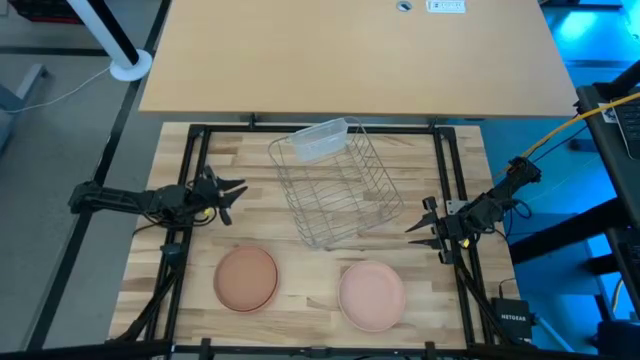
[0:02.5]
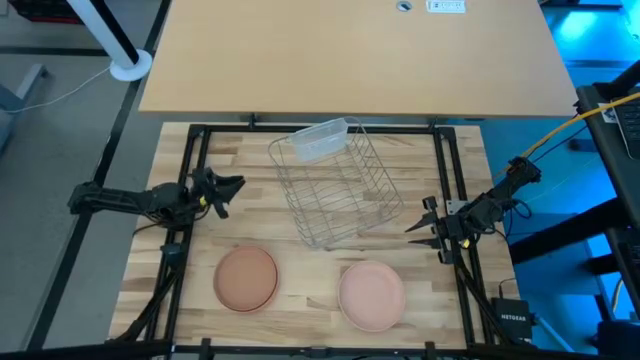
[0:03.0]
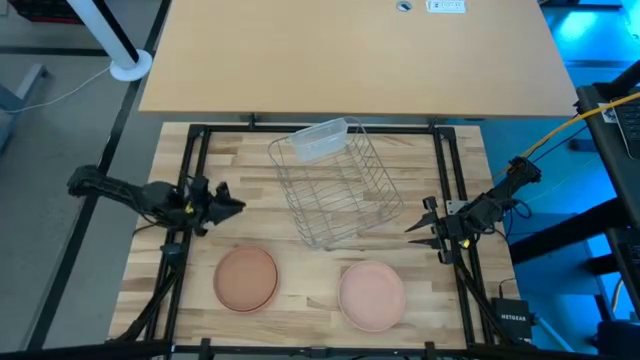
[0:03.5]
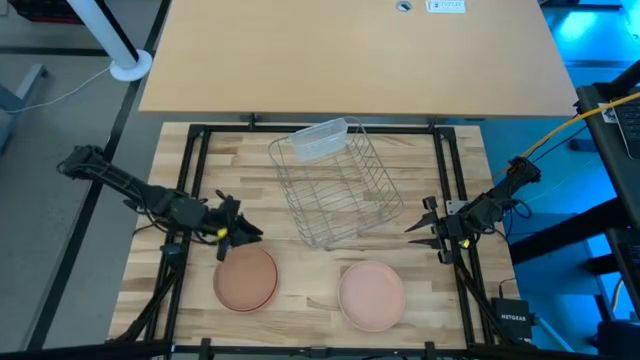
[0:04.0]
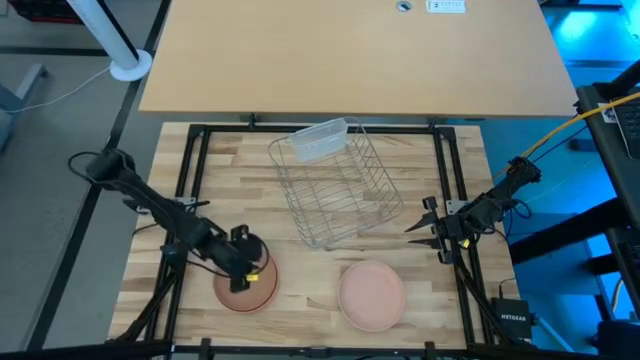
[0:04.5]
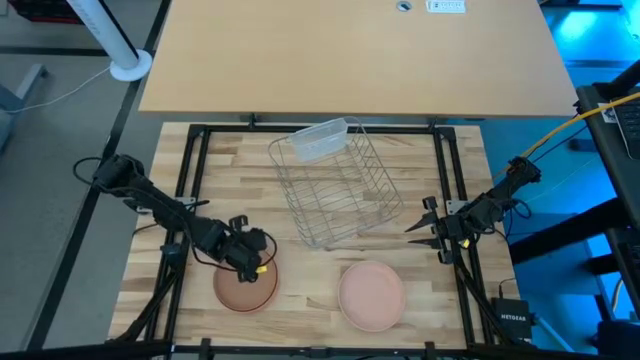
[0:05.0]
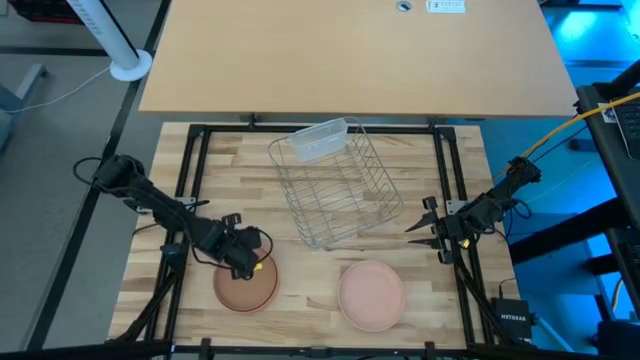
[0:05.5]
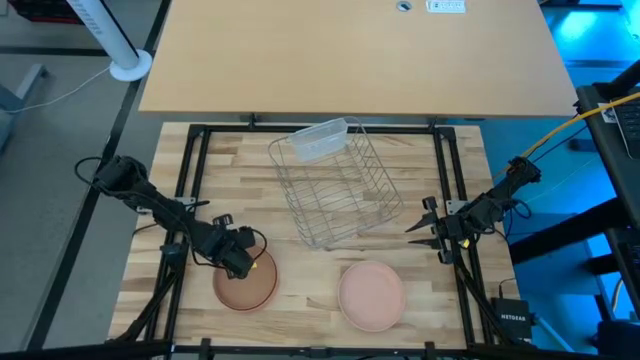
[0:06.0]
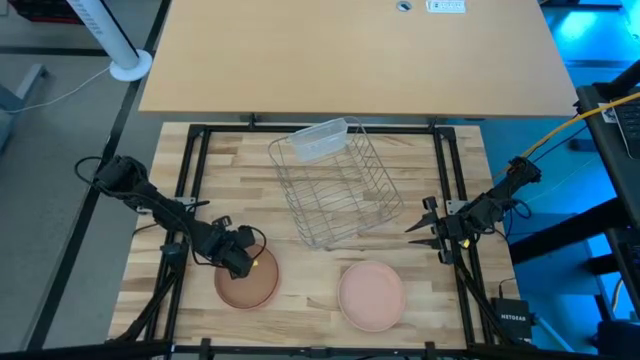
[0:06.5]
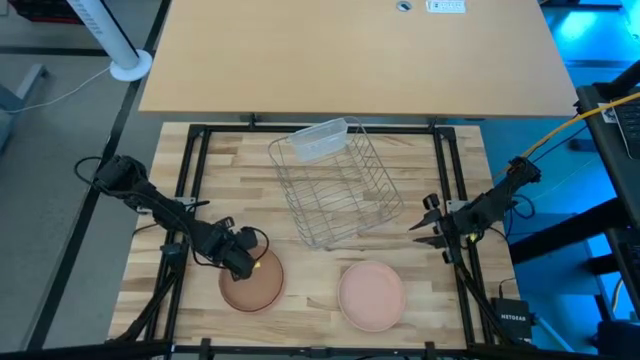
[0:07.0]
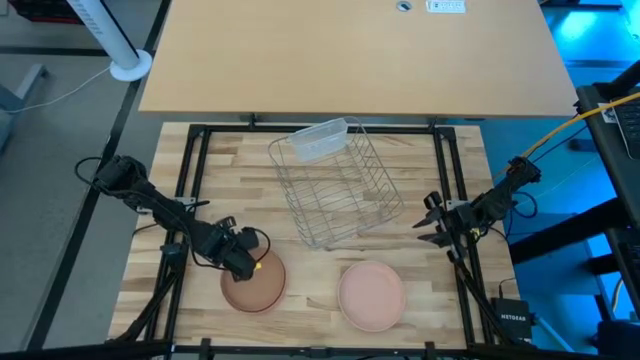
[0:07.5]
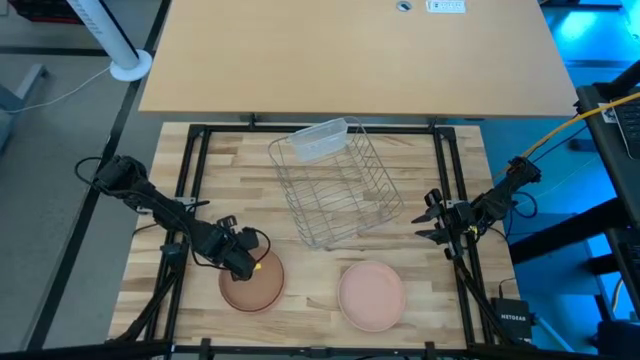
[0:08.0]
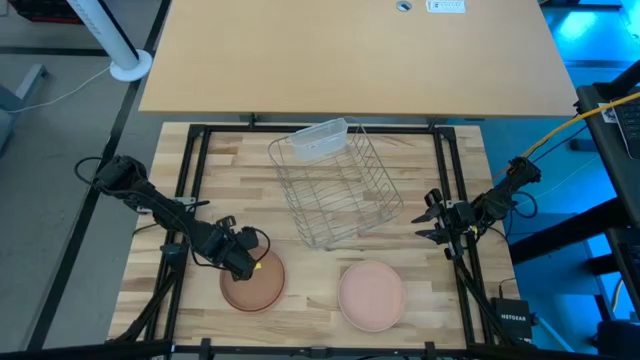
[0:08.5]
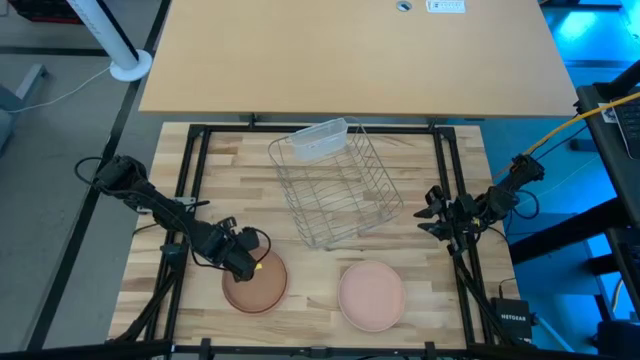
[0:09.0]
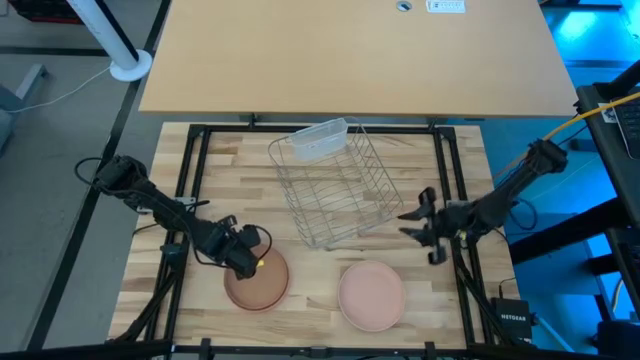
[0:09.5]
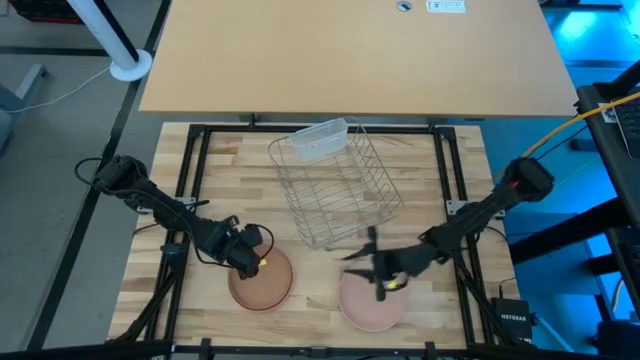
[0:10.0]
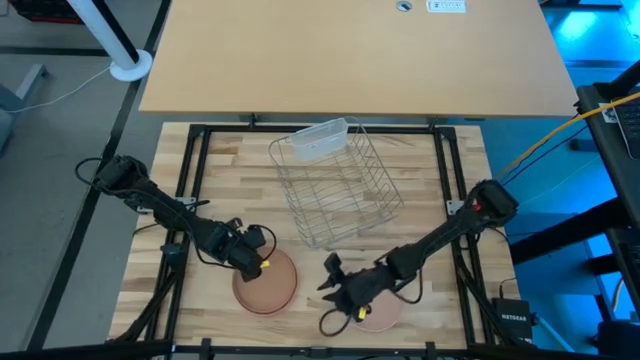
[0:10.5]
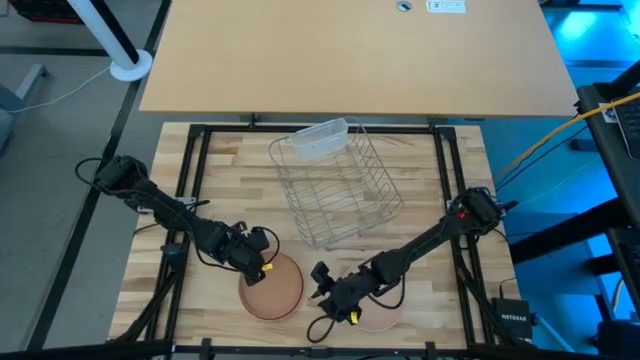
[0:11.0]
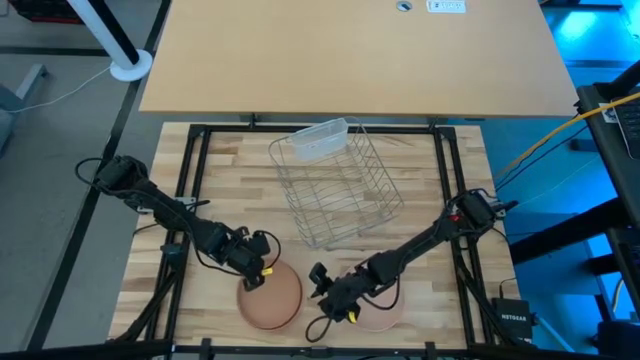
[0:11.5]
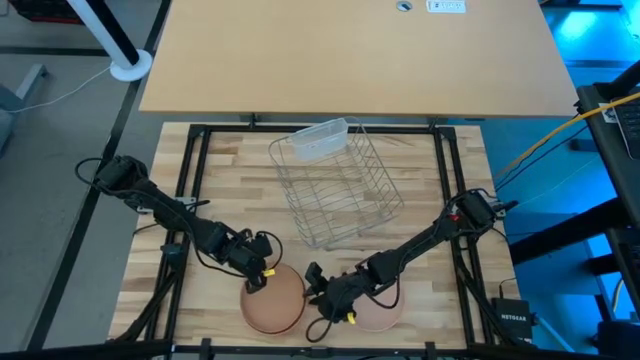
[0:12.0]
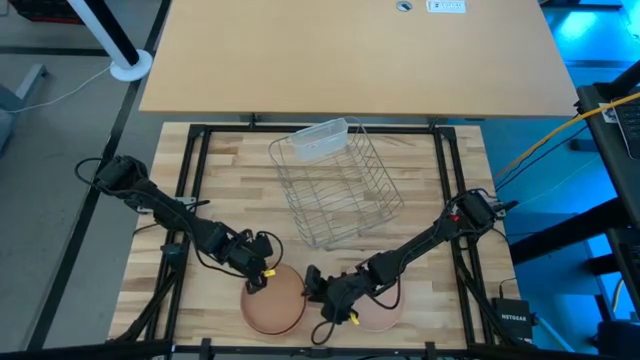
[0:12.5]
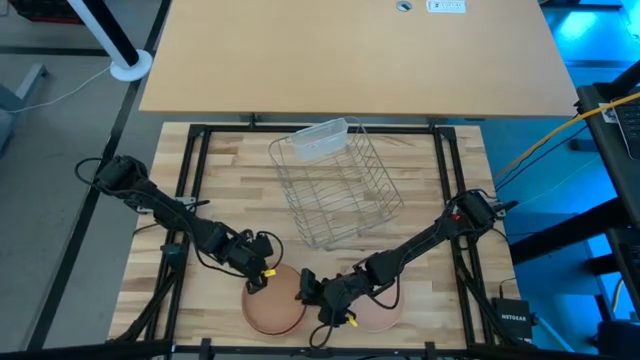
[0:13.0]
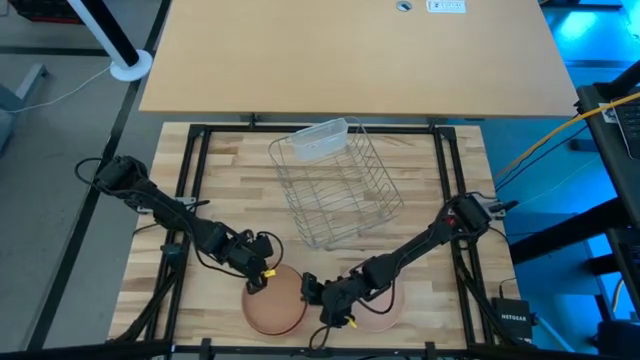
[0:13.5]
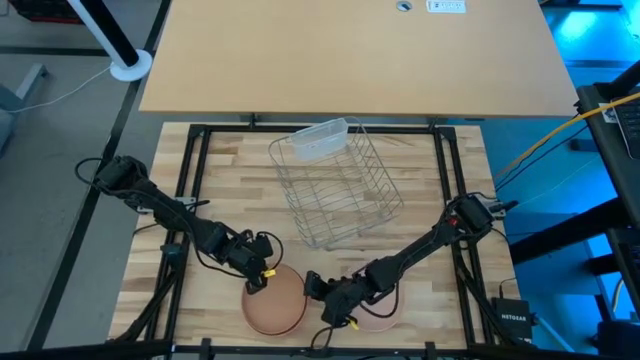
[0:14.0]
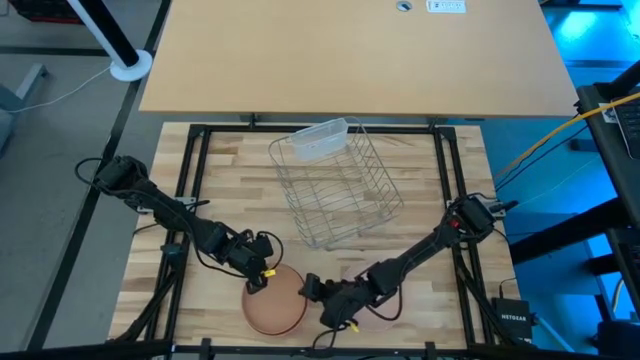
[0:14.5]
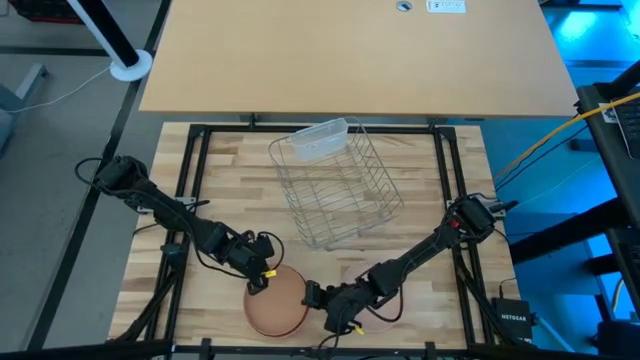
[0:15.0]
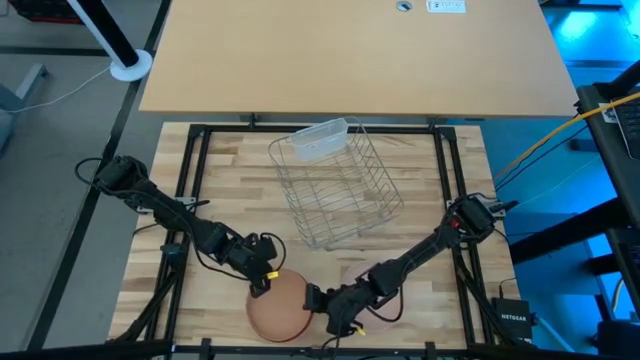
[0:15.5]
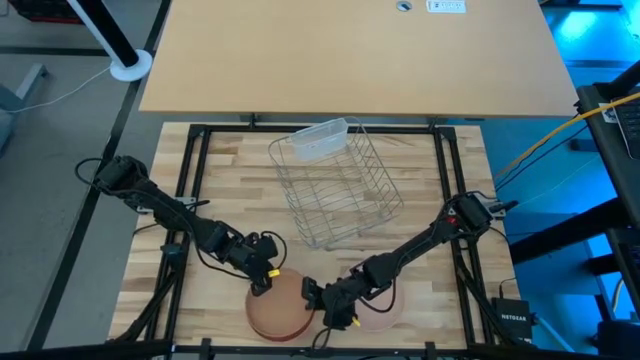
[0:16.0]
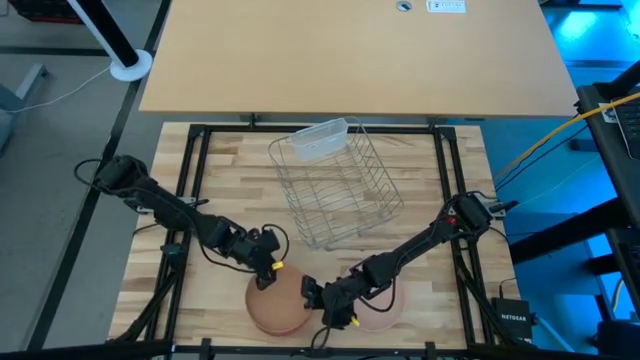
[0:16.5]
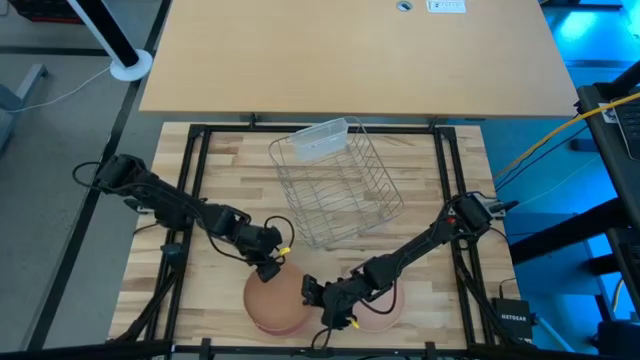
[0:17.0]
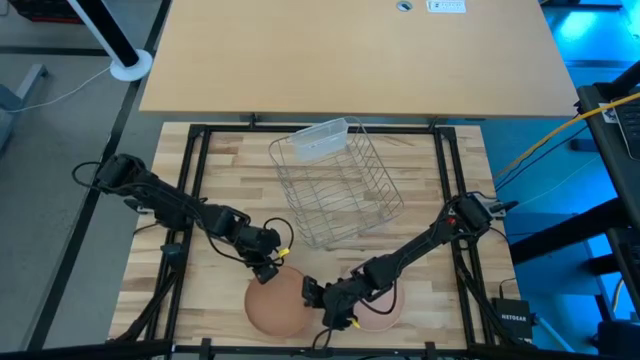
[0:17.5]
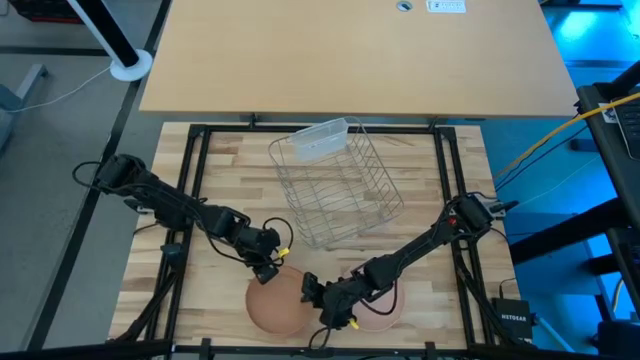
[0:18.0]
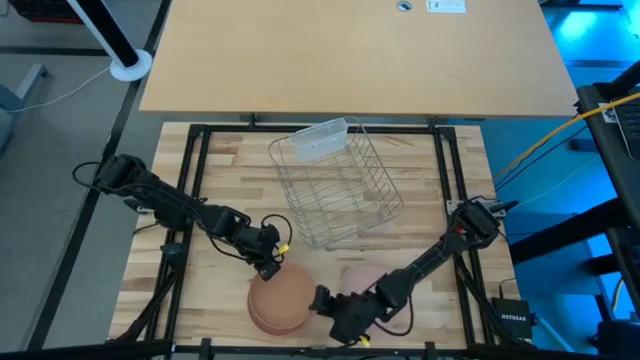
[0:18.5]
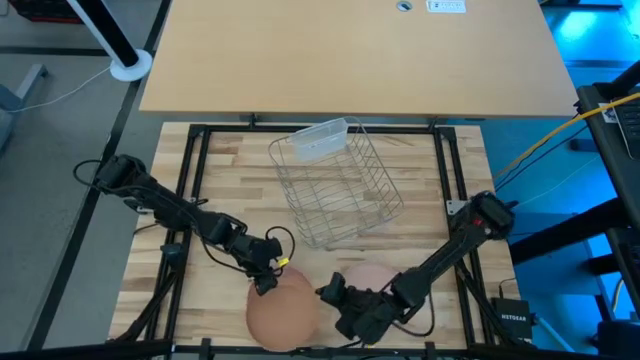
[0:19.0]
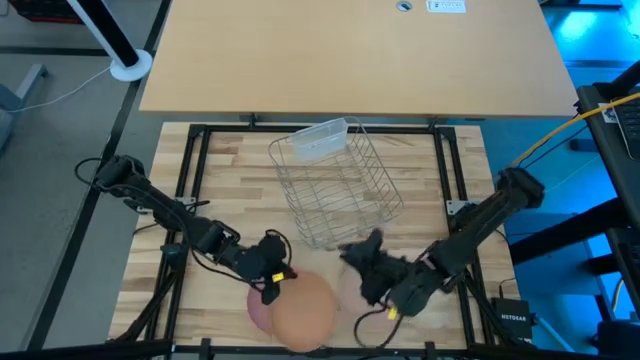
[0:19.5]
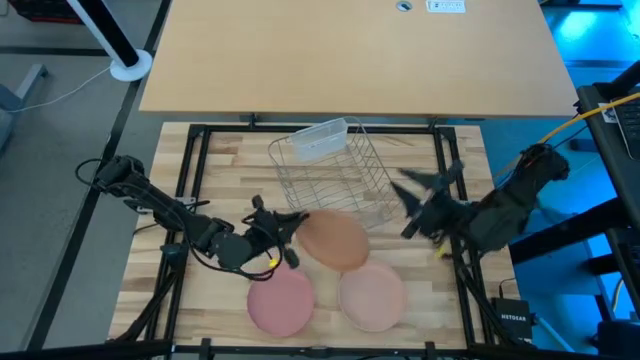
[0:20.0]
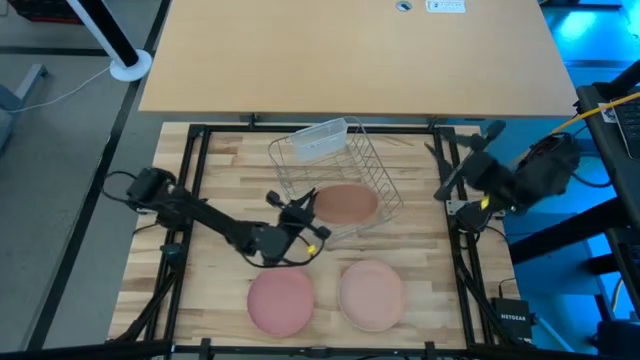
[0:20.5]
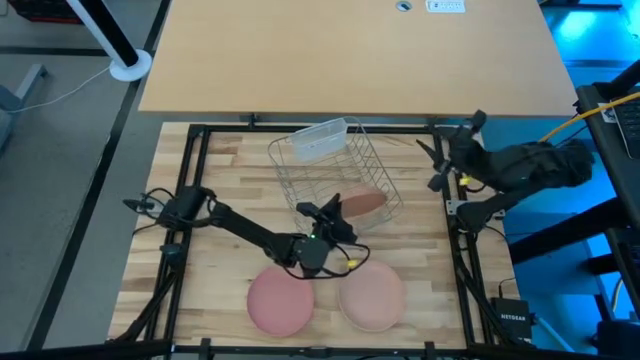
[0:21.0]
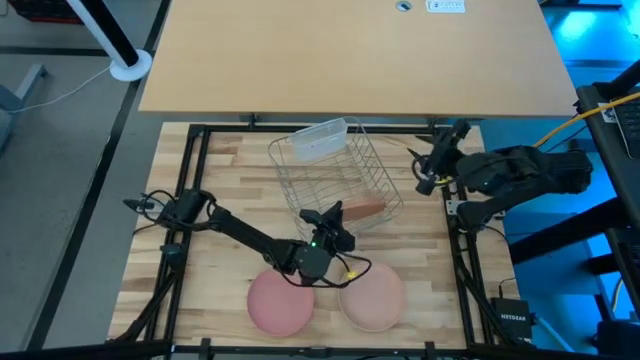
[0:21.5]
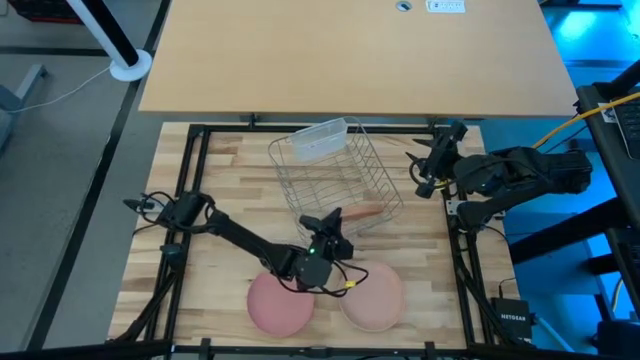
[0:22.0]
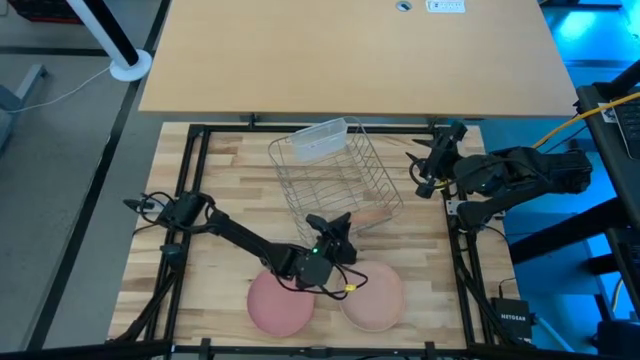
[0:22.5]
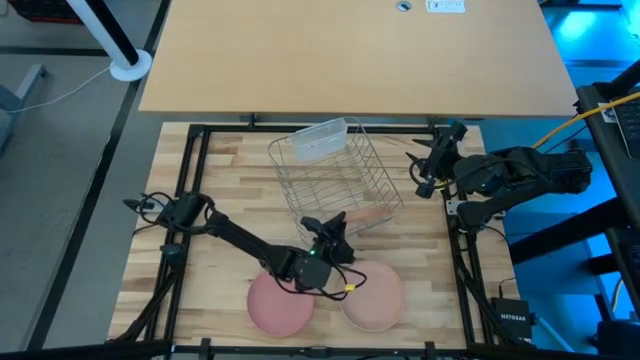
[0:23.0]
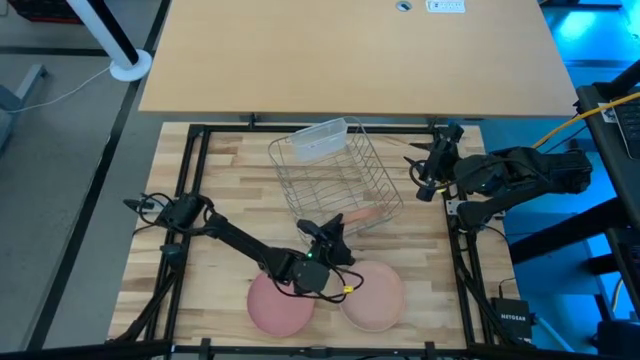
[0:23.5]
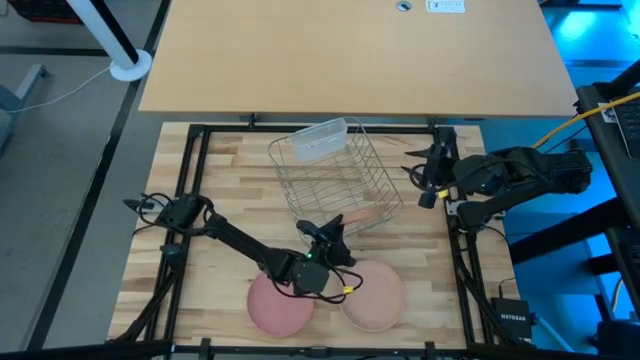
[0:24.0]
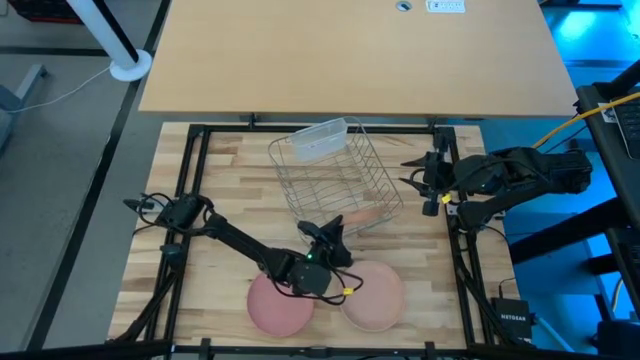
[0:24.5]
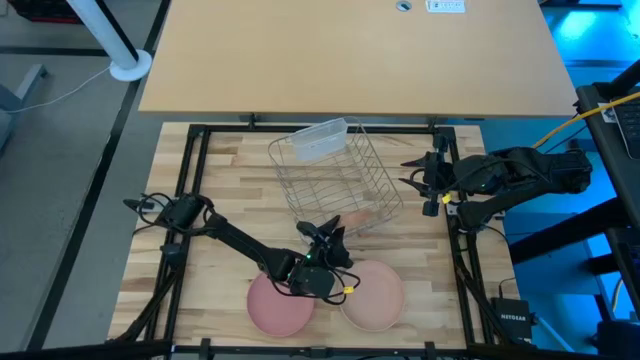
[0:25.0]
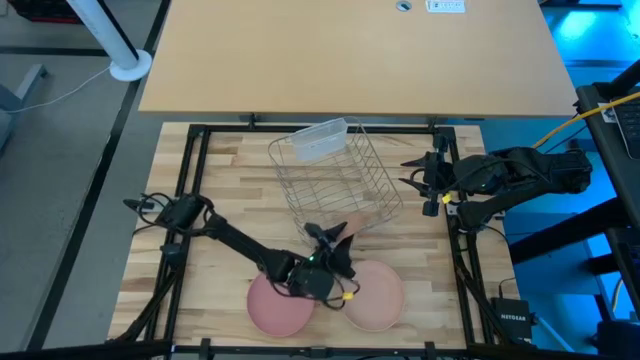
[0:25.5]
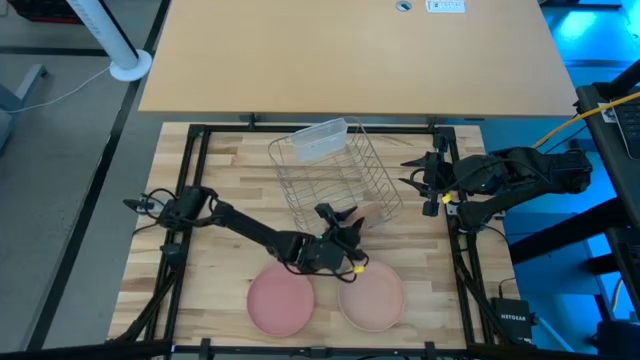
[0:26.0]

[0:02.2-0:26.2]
Task: Sort dishes
Put the brown plate in the dish rack
